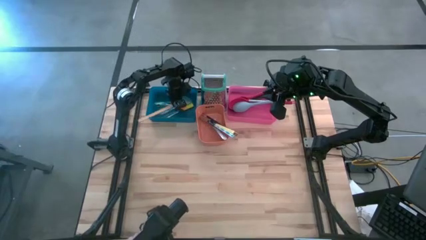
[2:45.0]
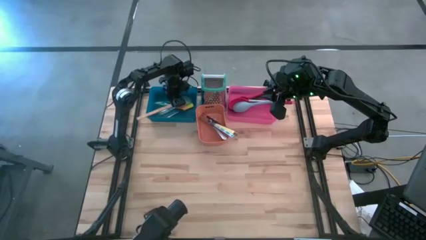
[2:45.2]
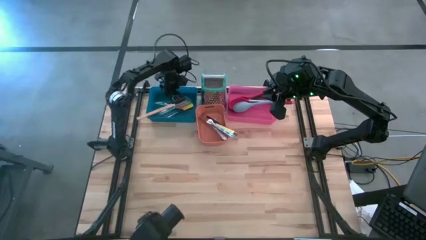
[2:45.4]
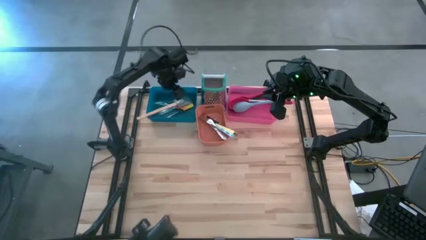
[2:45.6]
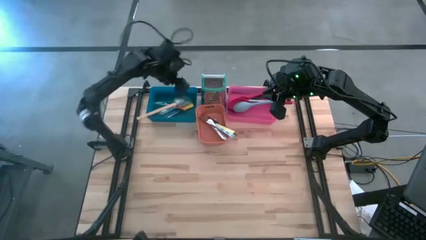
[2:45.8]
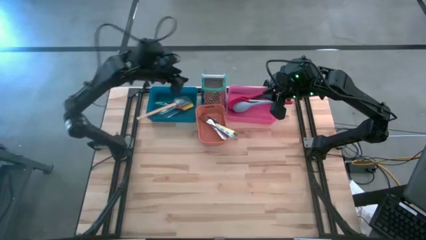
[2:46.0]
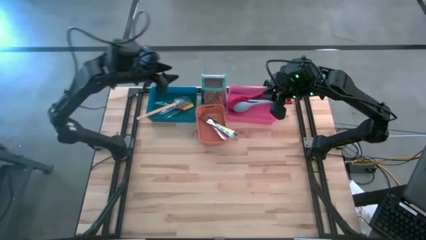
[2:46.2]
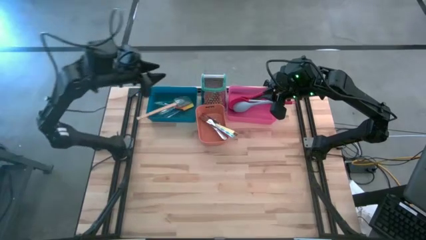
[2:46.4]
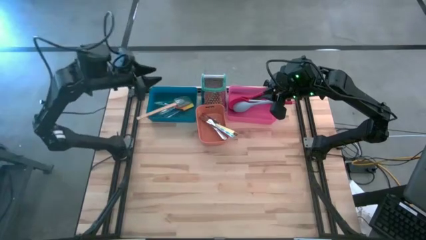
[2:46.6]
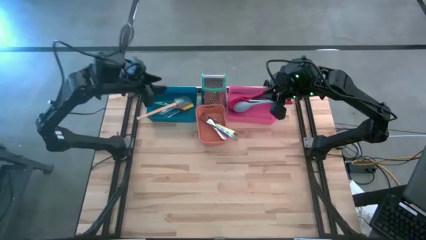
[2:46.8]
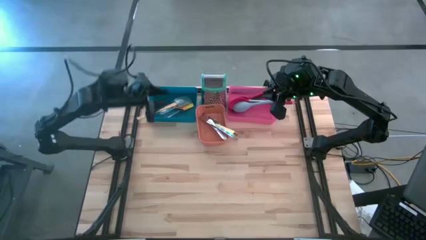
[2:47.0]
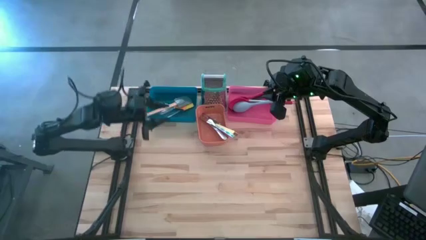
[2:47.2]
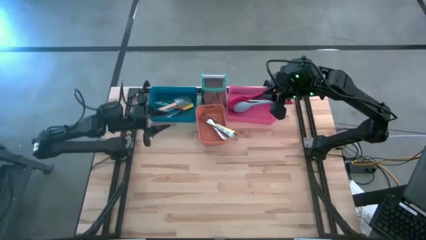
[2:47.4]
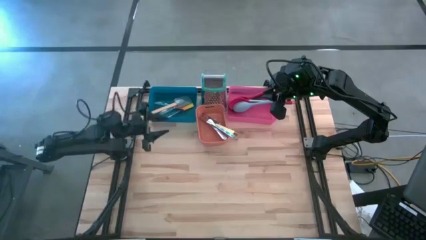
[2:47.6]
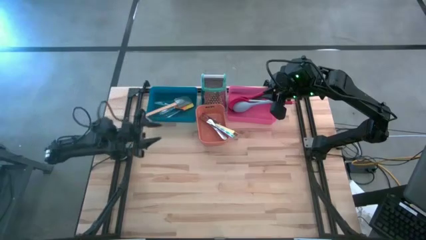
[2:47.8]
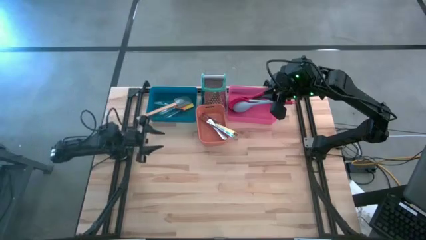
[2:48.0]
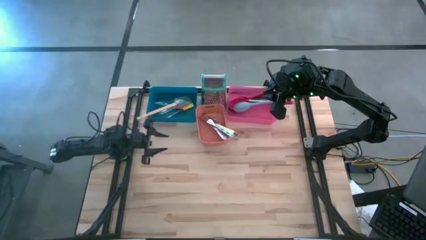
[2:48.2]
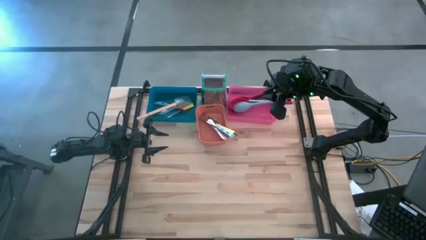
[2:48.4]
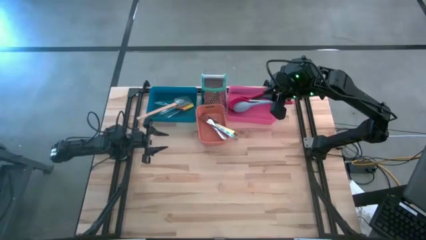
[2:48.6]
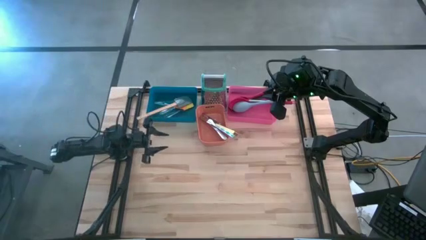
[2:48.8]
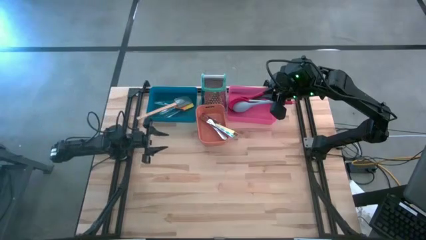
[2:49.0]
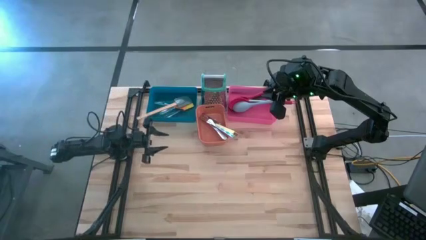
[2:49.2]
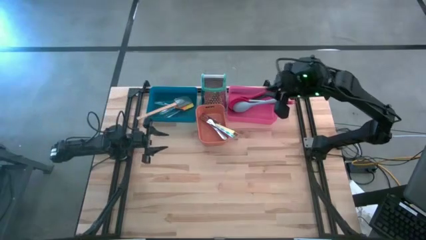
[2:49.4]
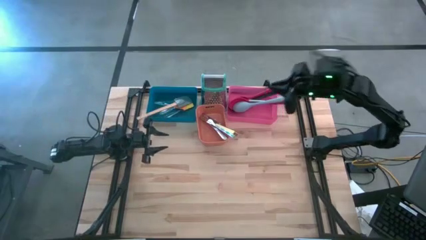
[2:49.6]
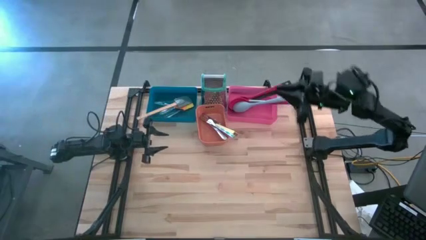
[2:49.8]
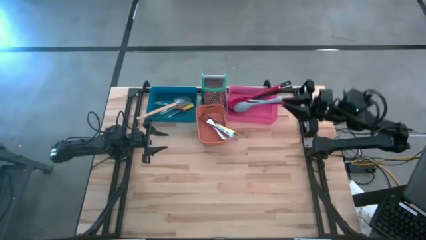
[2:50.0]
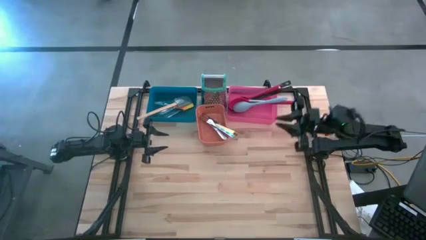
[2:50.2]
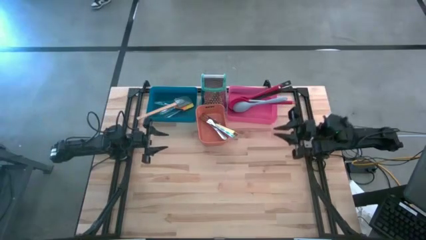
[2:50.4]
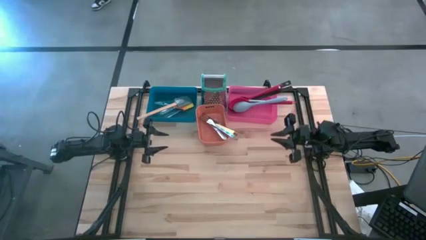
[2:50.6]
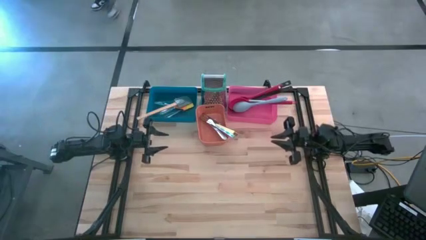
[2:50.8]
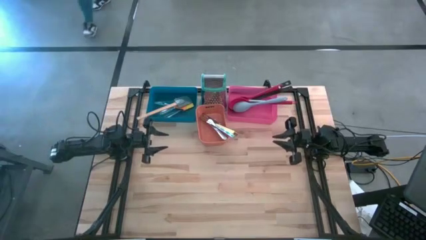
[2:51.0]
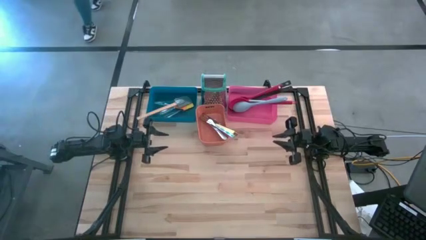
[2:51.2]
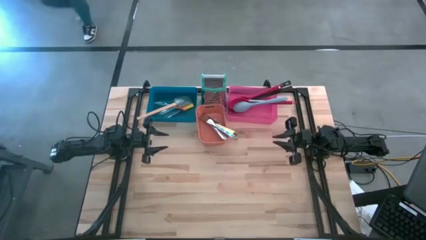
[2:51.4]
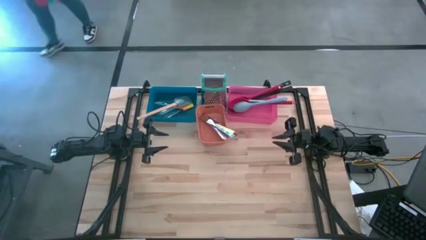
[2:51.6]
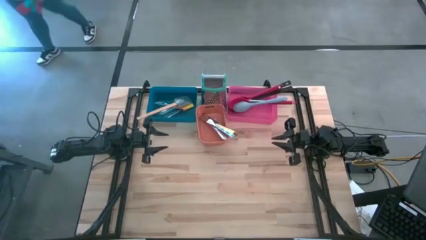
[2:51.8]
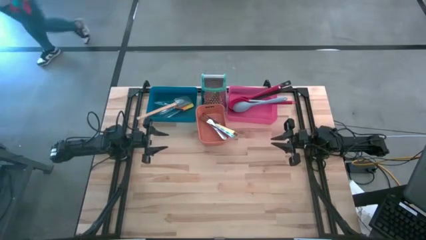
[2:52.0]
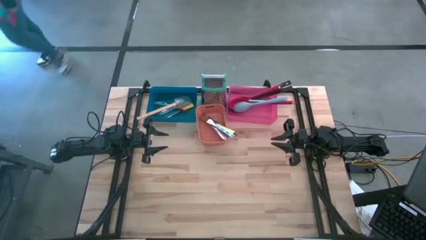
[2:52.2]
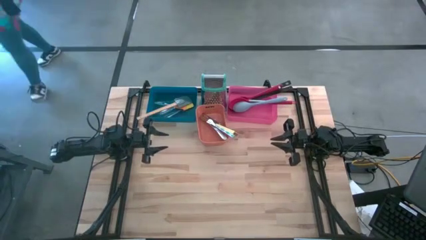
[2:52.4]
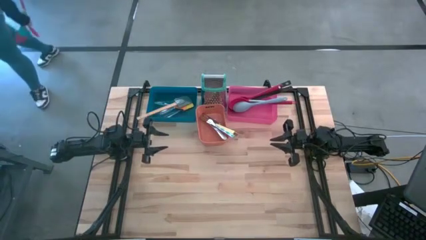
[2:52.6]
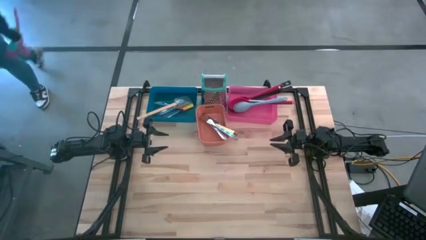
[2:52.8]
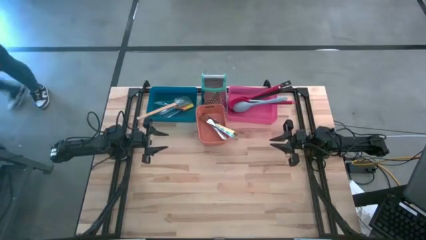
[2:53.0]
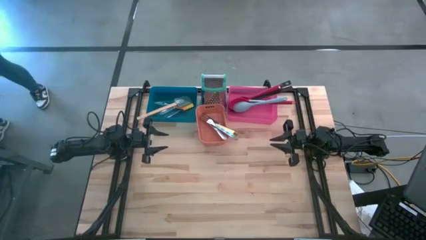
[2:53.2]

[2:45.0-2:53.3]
Task: Pick & Place Kitchen Items
Return to Home Position
